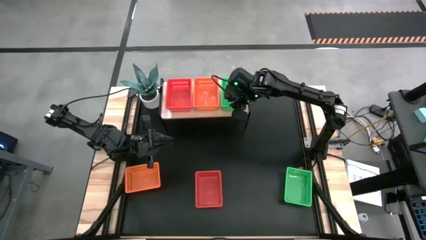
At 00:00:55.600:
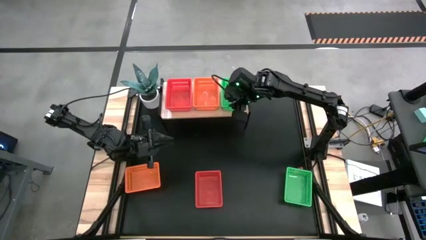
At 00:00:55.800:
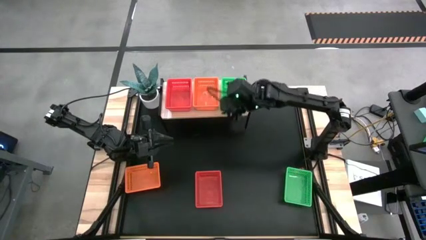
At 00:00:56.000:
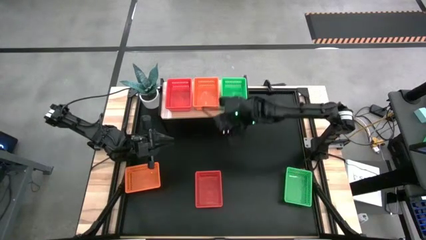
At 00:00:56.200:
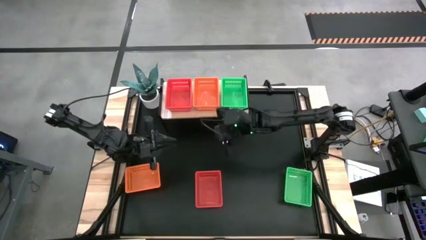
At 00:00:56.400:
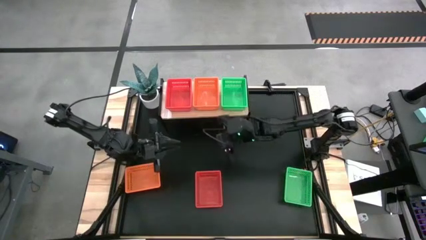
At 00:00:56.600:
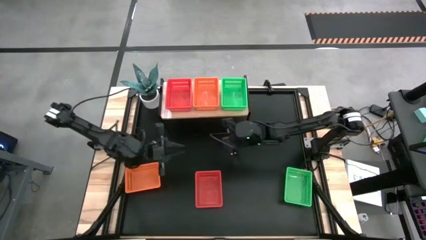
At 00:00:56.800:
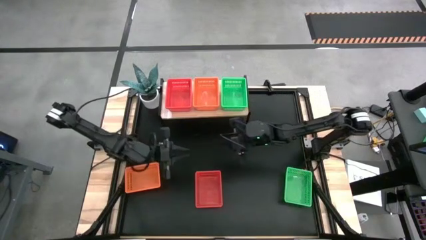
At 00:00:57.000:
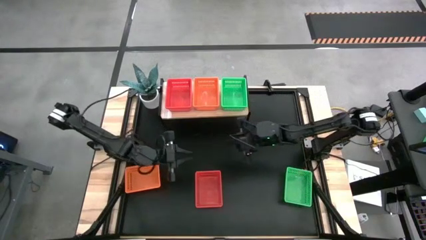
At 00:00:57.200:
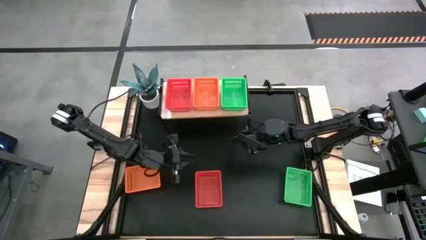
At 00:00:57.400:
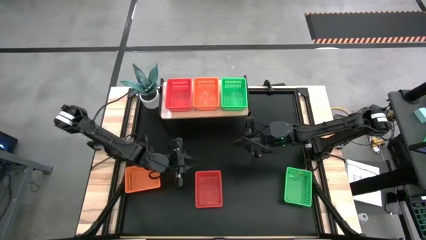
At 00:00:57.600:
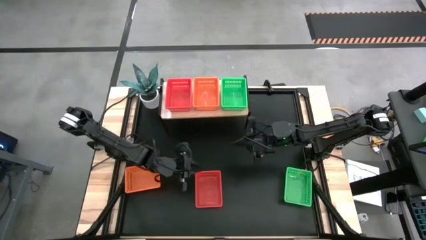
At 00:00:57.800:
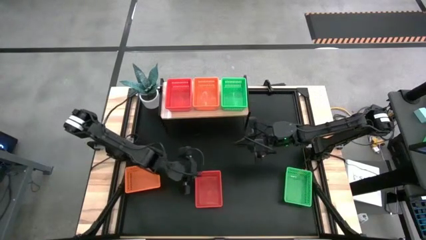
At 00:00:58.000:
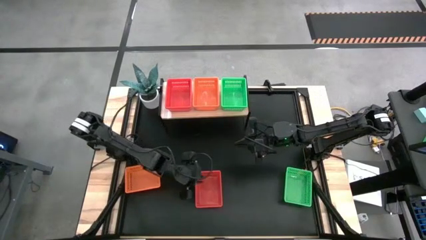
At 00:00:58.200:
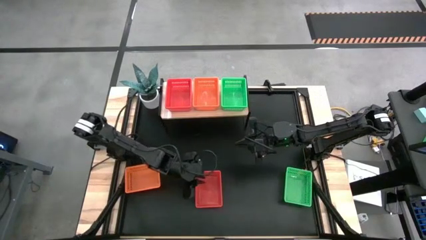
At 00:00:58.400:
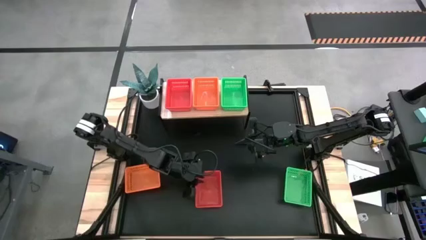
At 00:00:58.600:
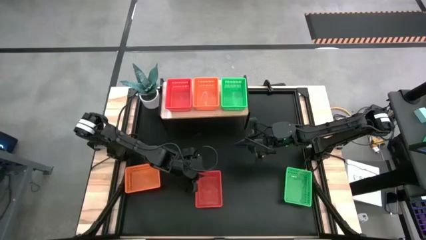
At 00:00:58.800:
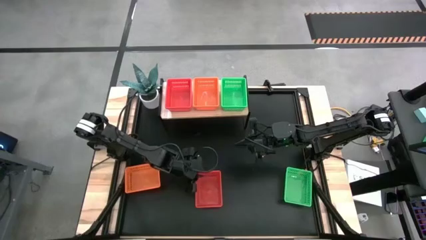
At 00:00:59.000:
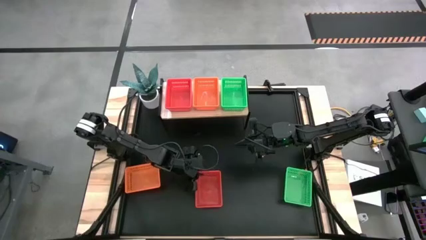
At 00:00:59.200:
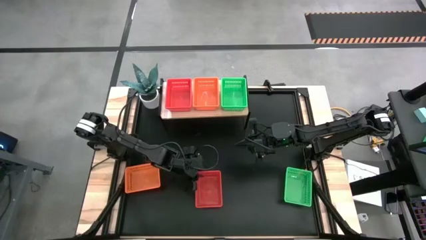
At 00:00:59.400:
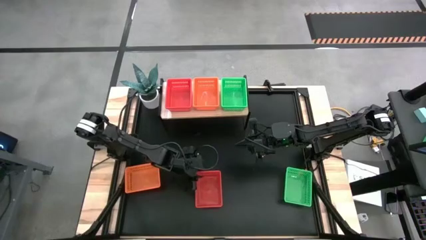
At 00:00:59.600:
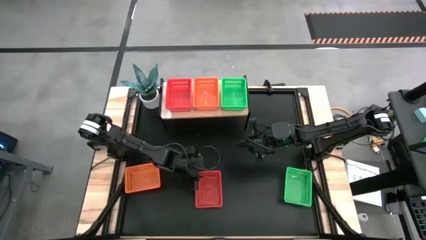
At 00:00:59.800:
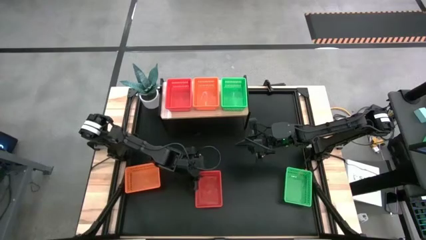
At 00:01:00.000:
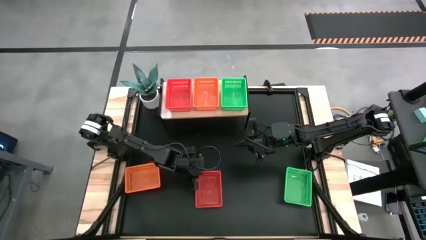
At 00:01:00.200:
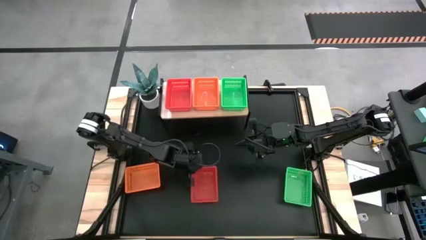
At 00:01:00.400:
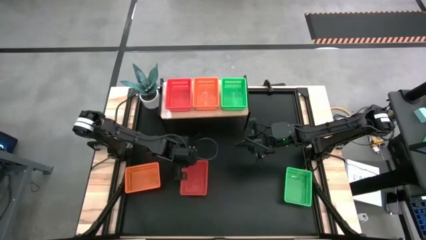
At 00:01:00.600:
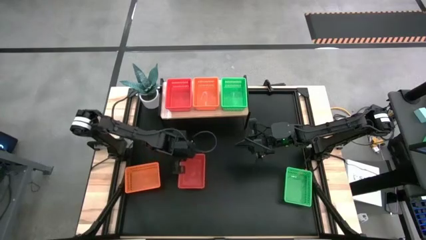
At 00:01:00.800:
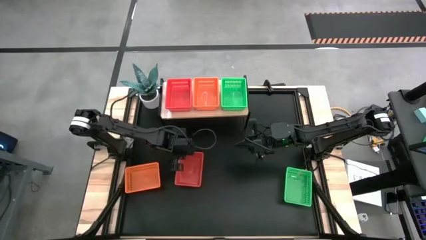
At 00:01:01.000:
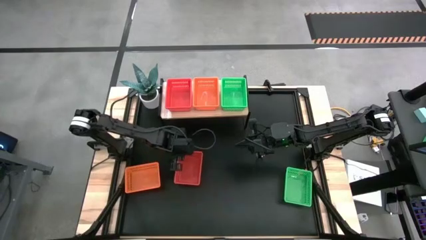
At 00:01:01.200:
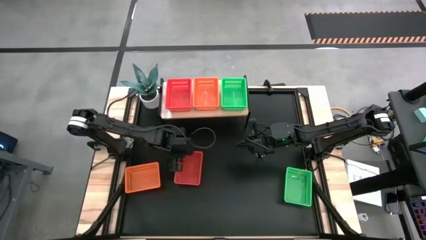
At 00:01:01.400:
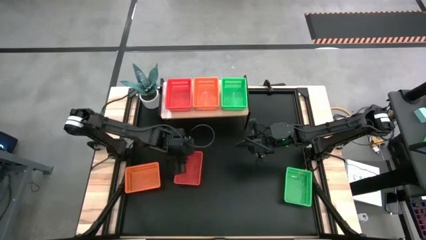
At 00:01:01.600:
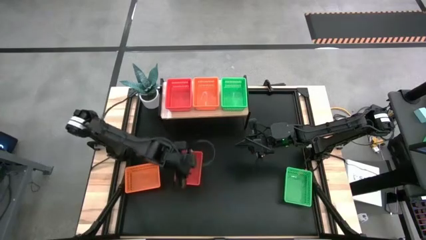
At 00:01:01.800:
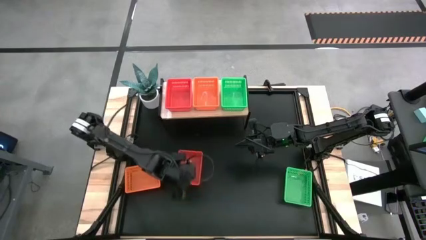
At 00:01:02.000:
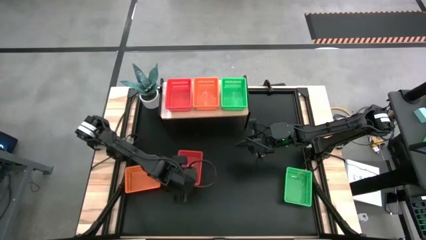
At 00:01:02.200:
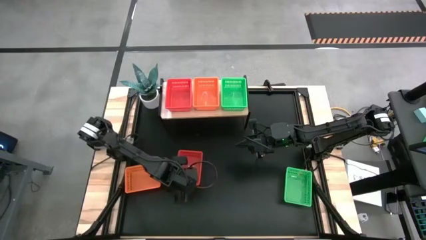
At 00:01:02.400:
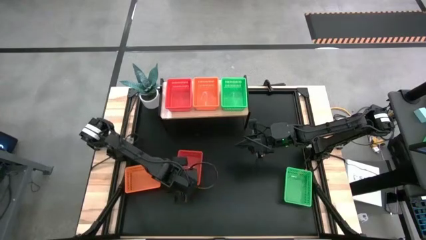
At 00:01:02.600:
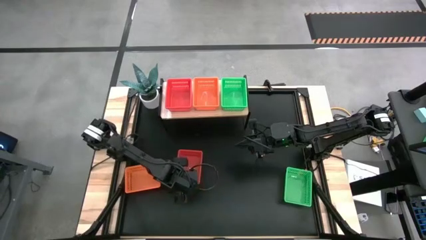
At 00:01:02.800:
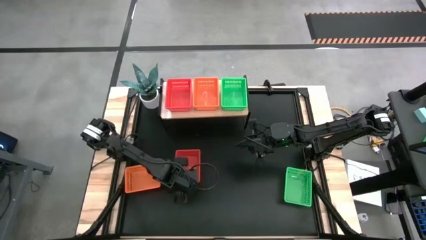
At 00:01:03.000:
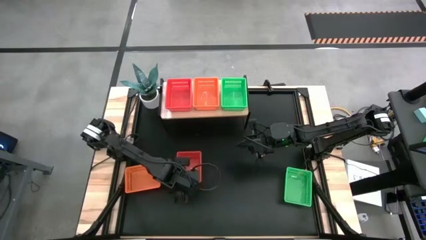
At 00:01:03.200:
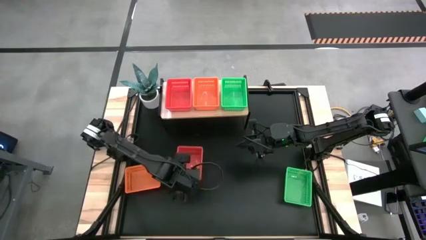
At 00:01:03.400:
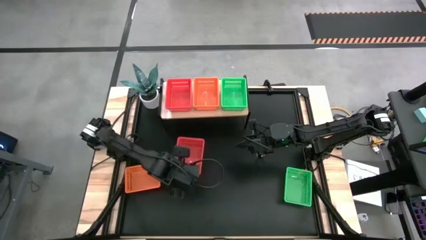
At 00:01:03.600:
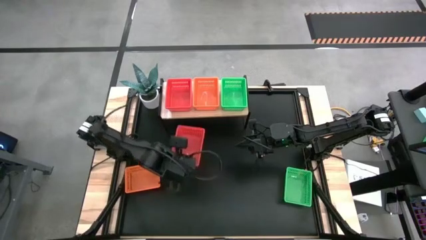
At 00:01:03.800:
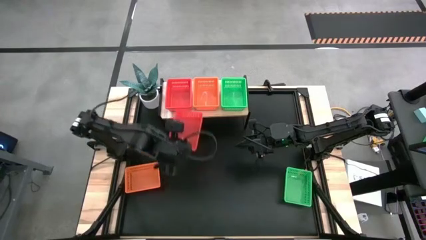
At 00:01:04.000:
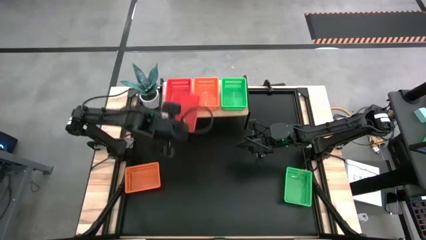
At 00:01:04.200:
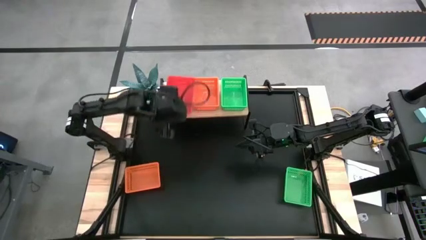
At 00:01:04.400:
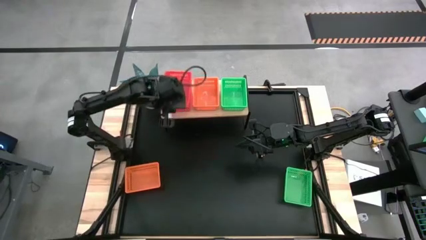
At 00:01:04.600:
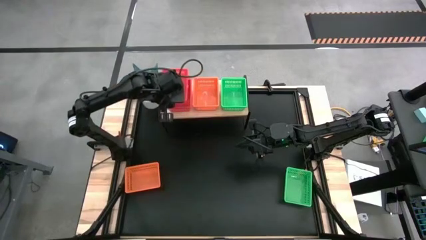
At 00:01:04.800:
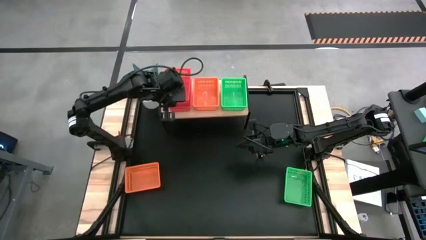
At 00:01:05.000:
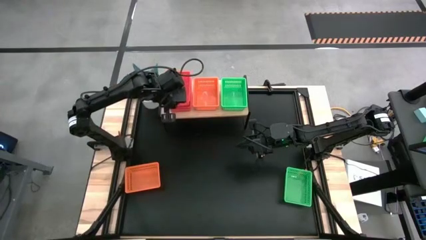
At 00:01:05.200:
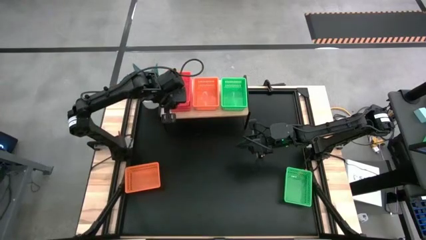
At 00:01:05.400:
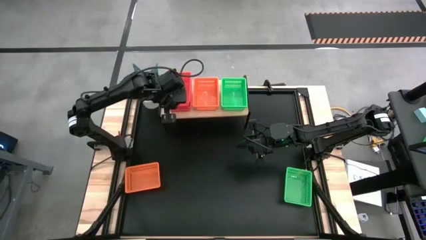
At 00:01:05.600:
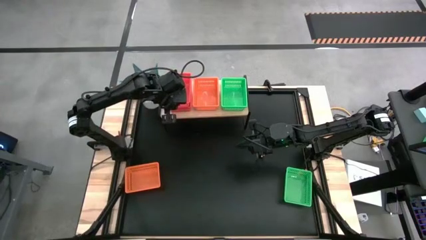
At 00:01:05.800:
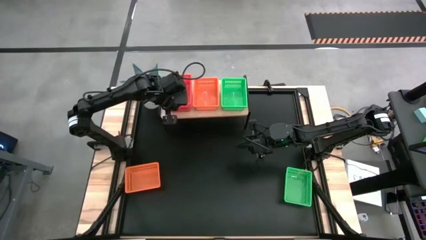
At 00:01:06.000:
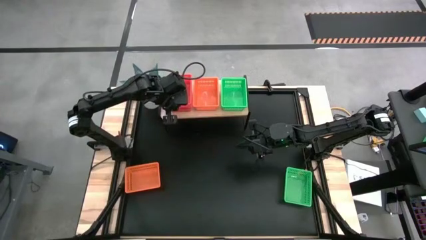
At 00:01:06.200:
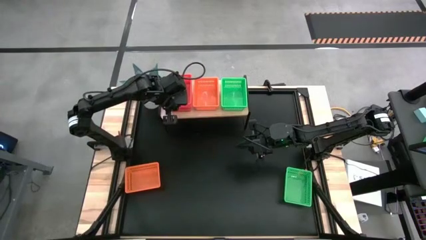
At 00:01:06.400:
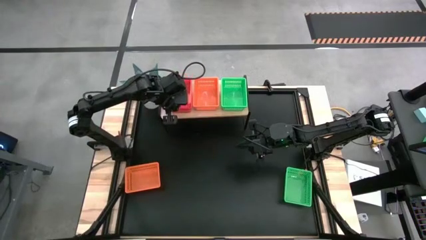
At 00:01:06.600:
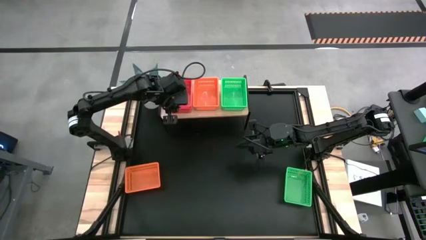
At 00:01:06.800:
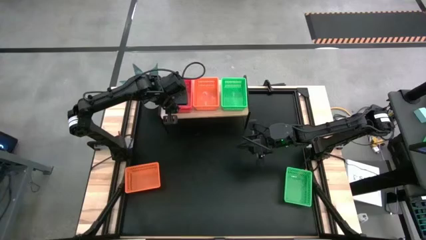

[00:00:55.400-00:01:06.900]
Stack the red basket on top of the other red basket on the shelf
